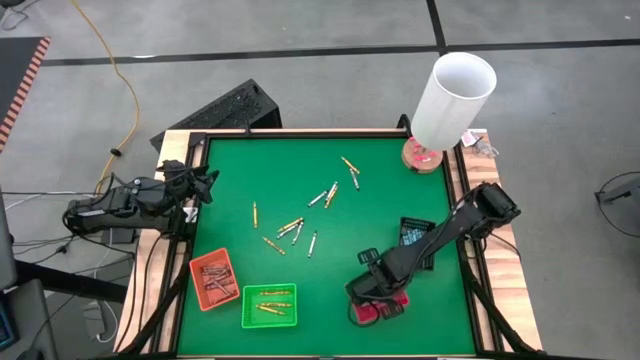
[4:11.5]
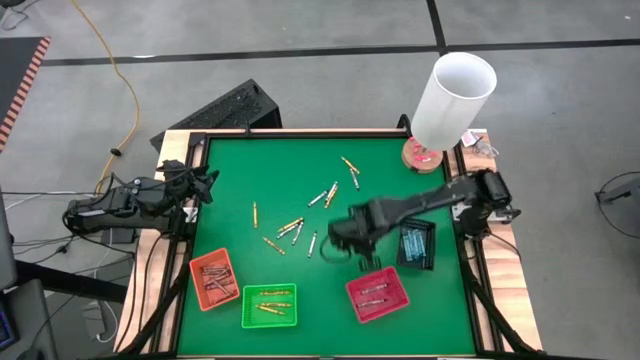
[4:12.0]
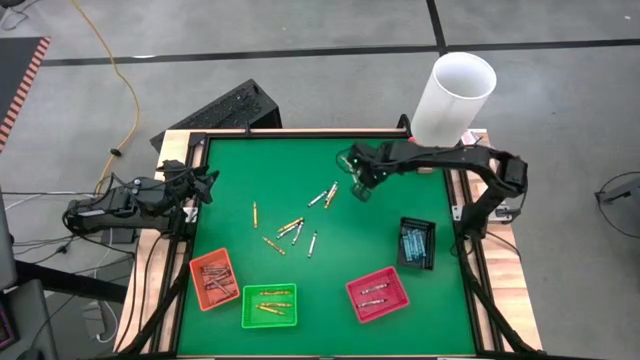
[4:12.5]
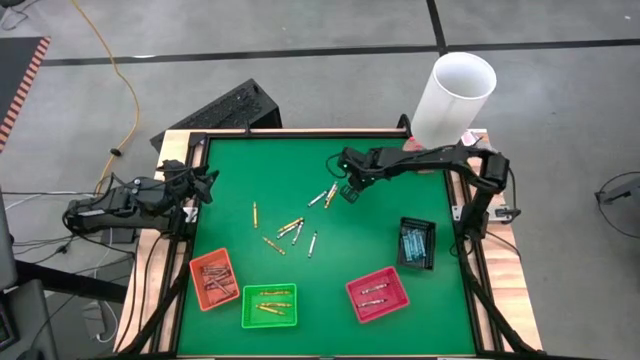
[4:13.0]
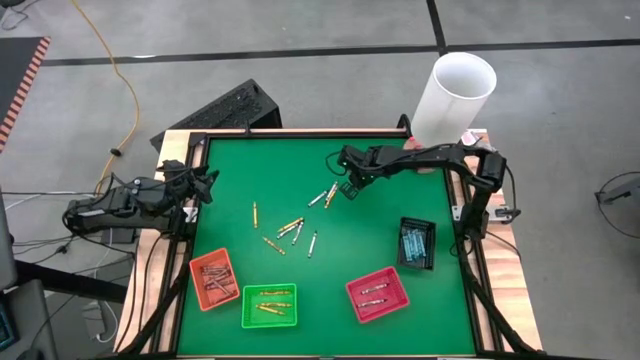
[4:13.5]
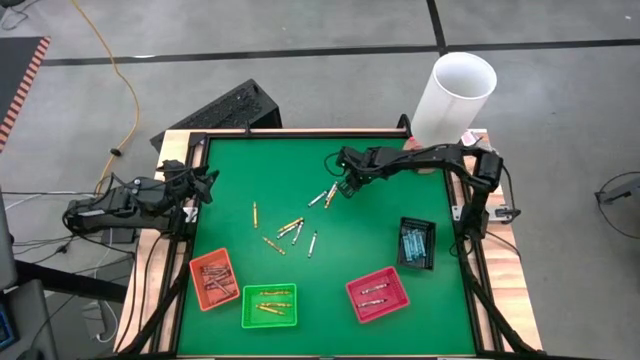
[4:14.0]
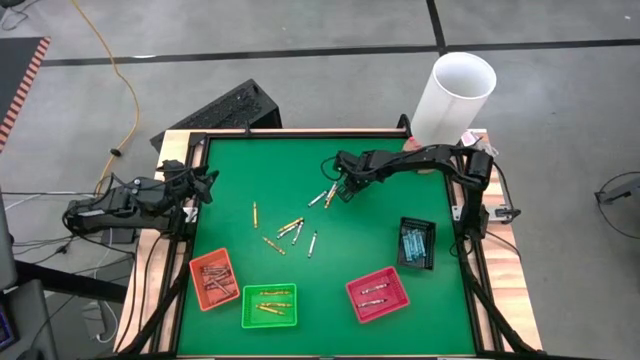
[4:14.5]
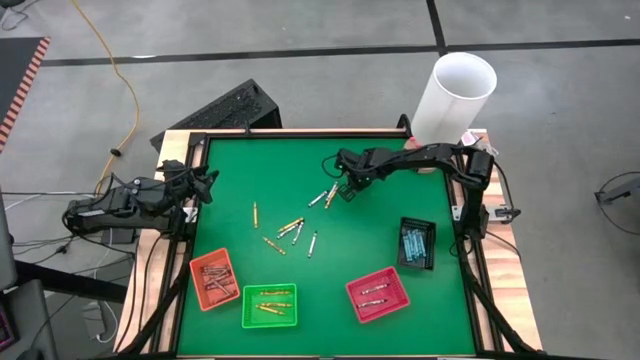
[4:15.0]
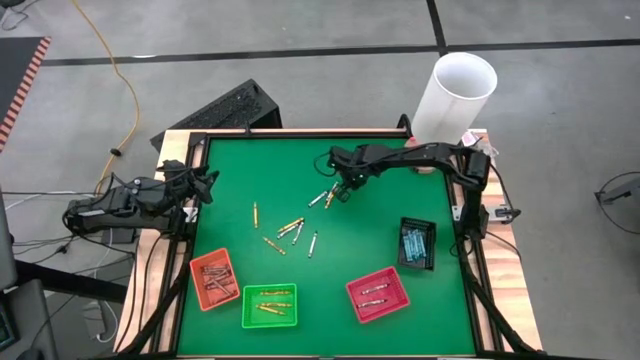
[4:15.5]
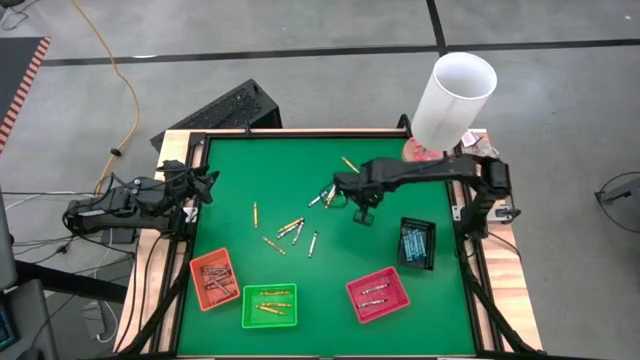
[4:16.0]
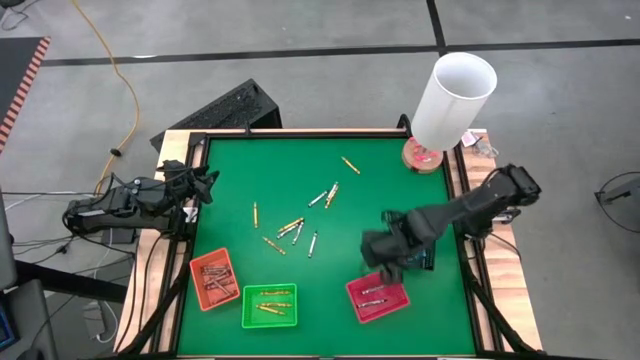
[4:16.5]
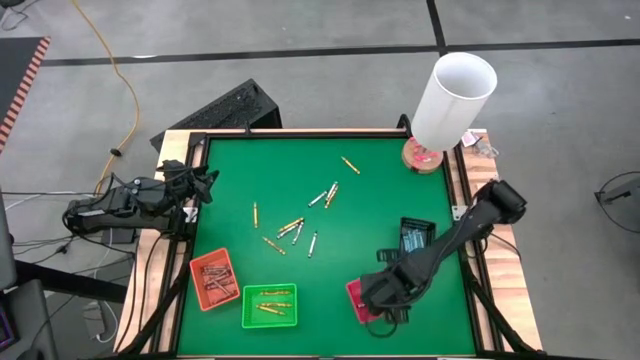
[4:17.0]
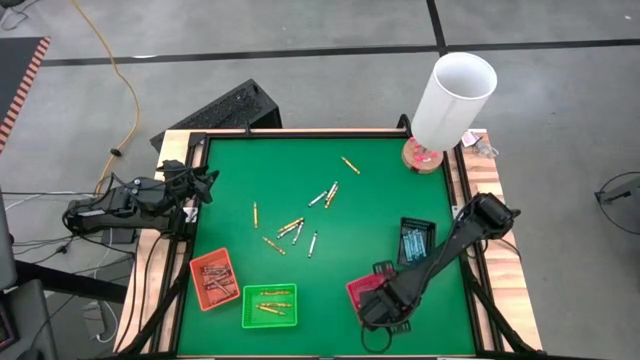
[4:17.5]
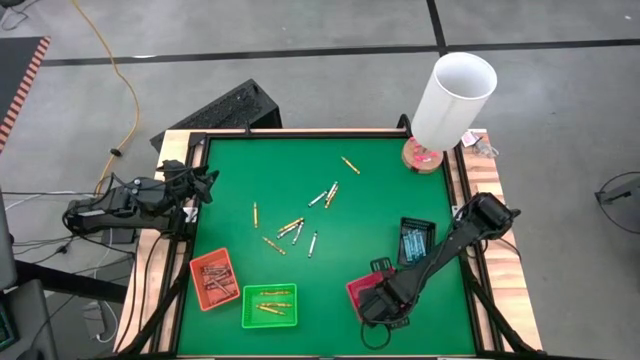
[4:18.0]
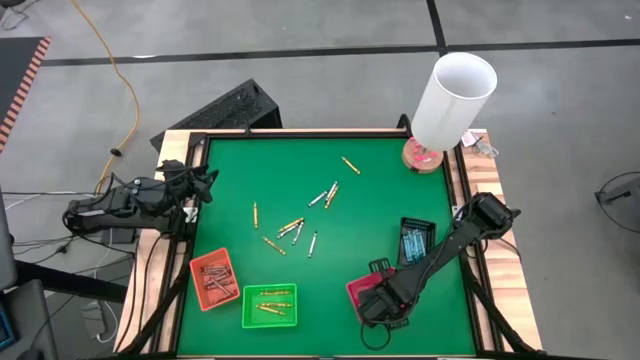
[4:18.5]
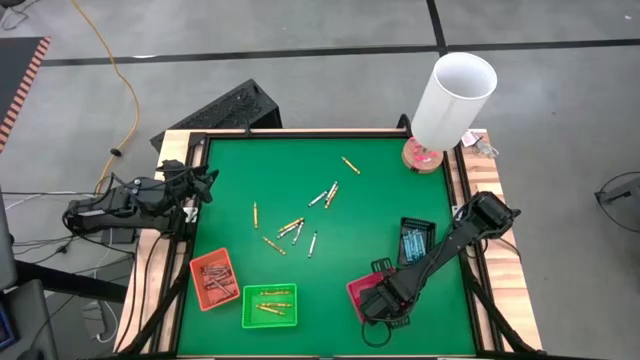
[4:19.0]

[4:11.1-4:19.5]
Task: Sort crayons
Put the black crayon into the red bin

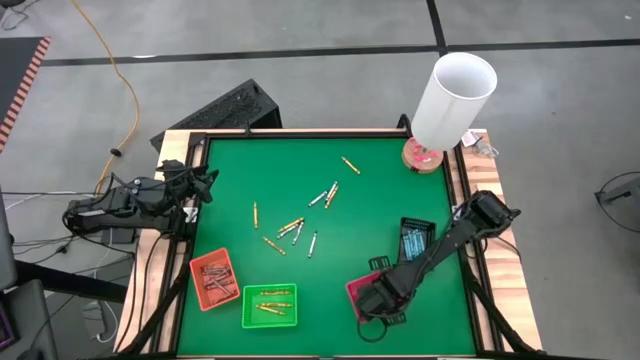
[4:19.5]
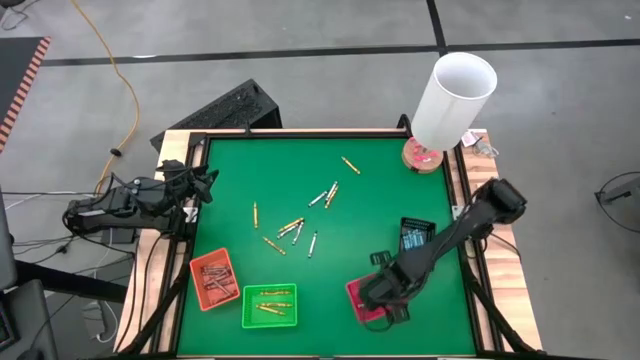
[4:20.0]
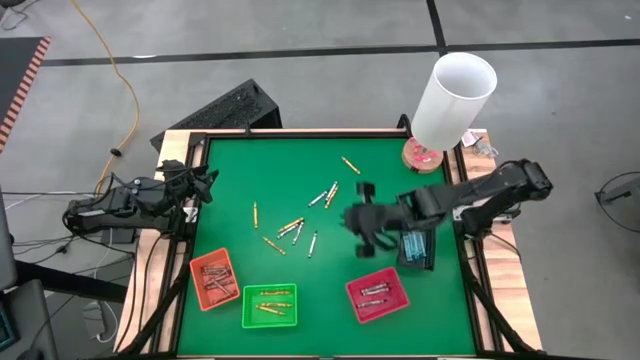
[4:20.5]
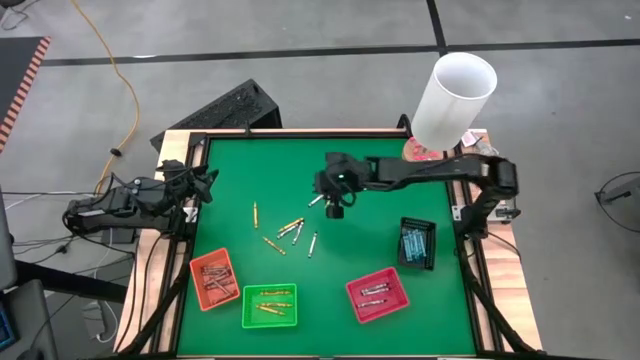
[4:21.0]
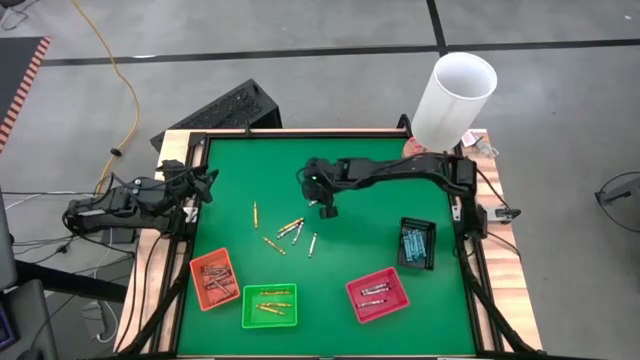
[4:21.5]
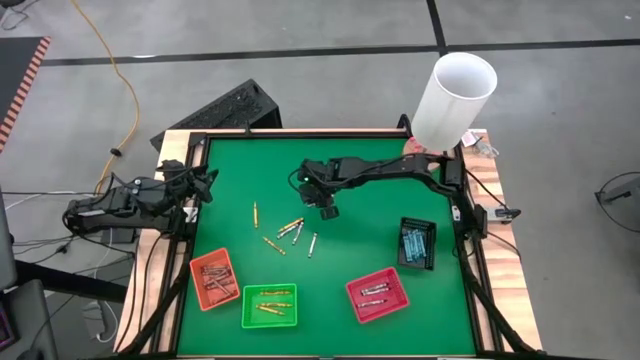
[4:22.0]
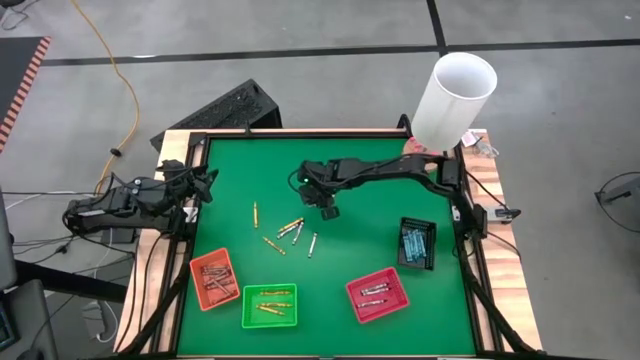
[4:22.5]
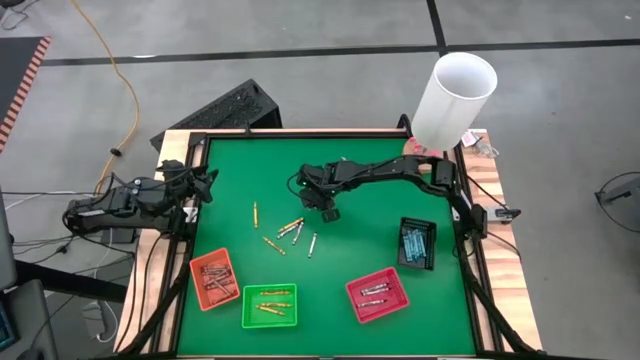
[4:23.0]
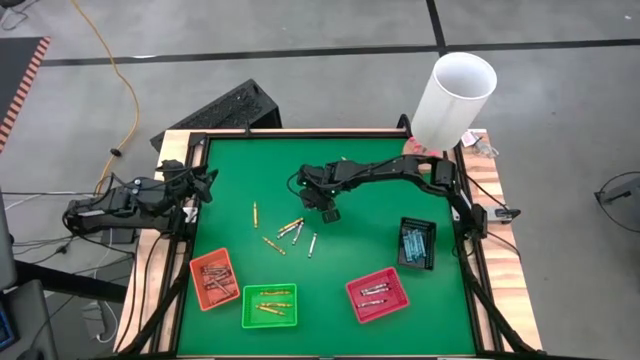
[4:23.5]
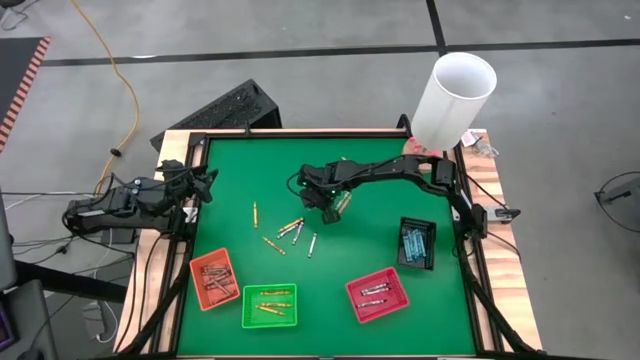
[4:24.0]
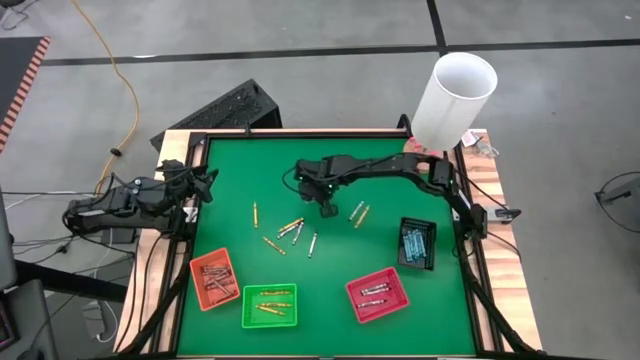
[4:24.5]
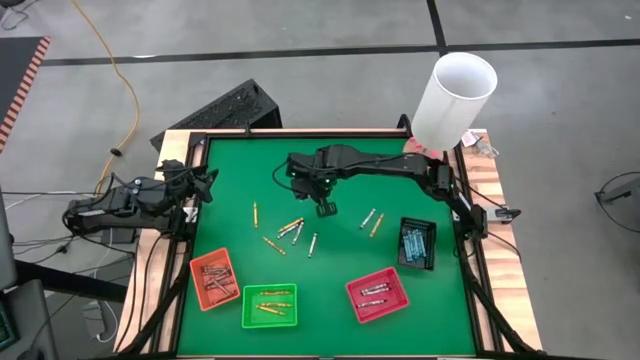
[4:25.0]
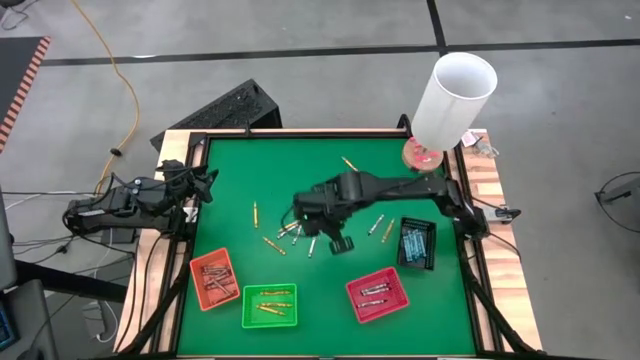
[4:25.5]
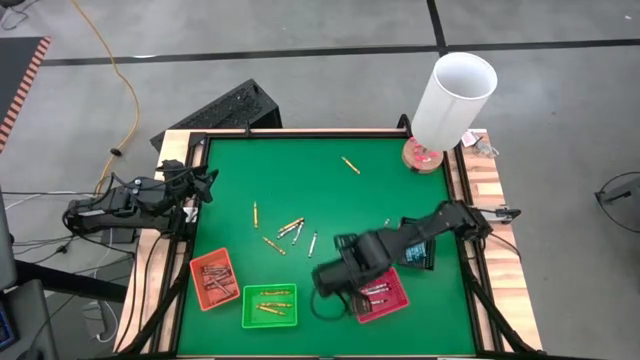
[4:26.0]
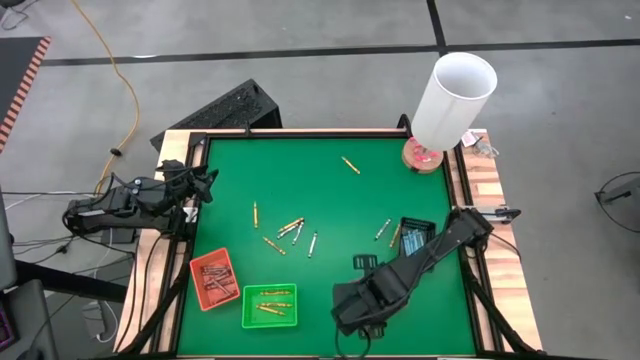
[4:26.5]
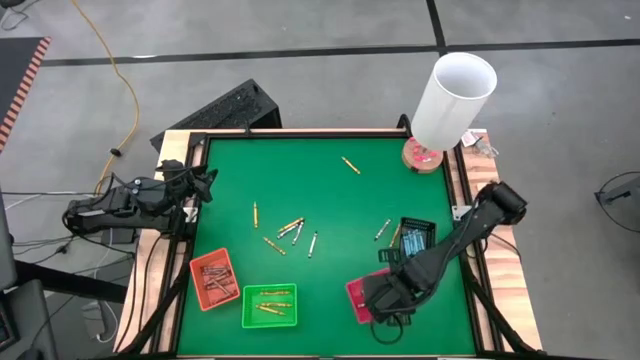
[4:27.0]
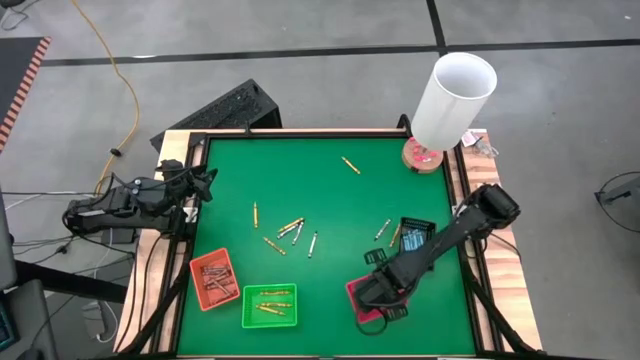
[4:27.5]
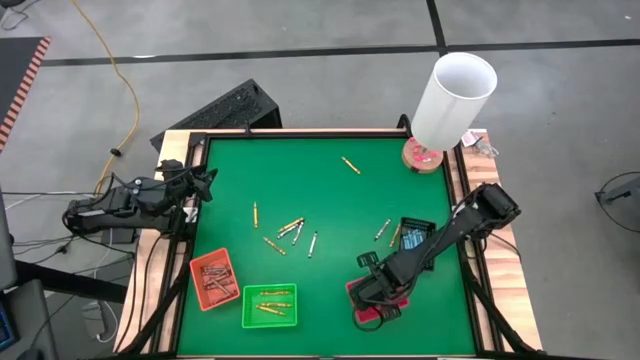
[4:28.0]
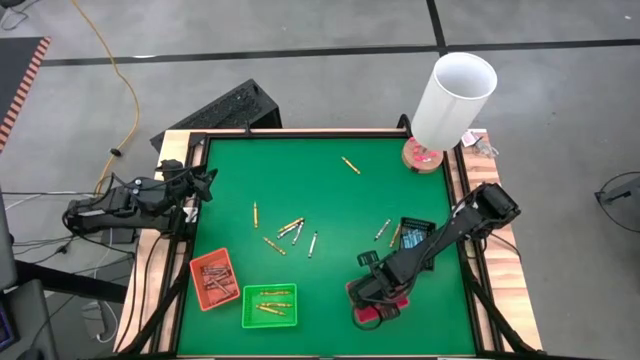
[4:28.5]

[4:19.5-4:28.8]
Put the black crayon into the red bin

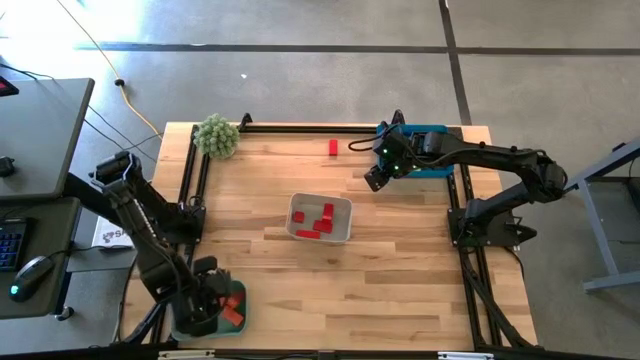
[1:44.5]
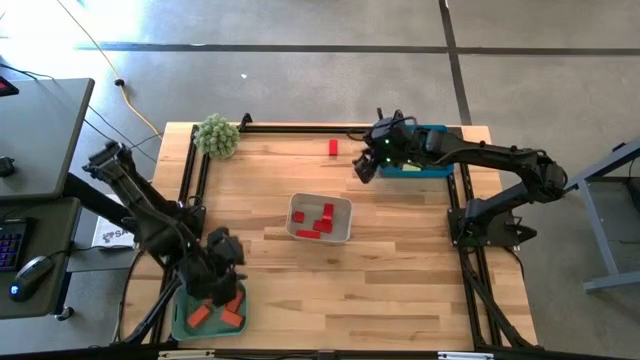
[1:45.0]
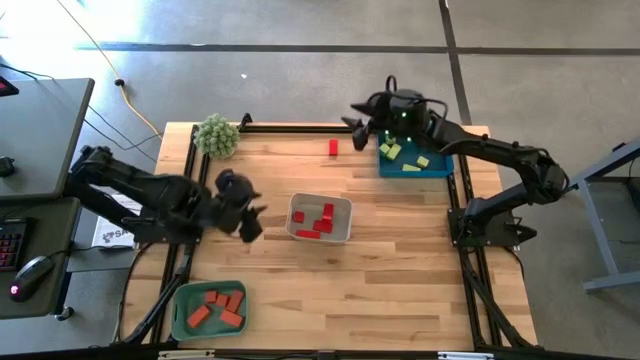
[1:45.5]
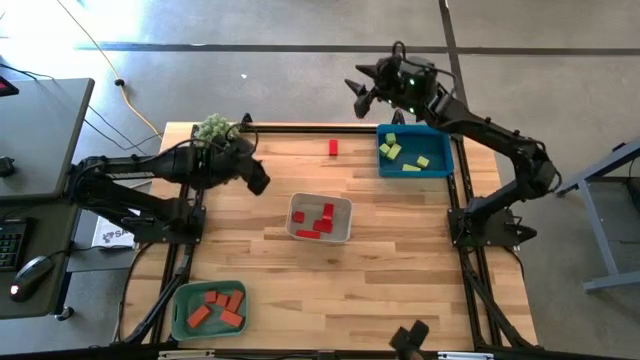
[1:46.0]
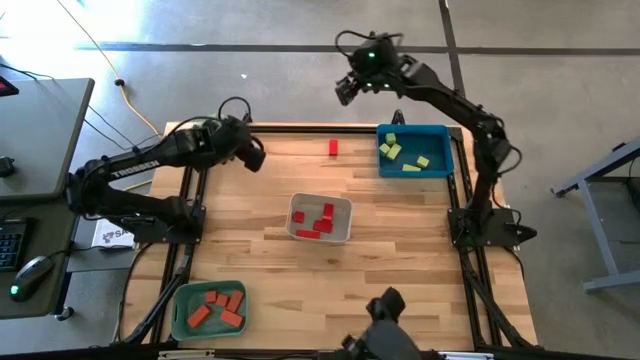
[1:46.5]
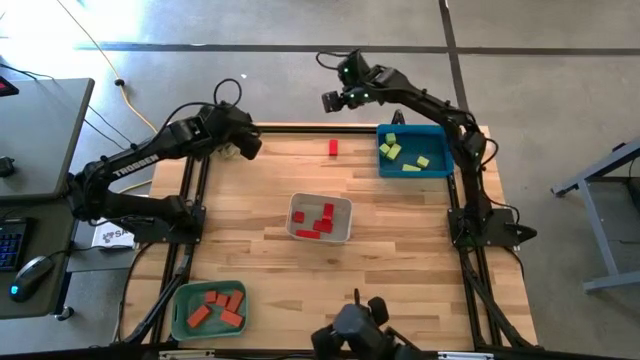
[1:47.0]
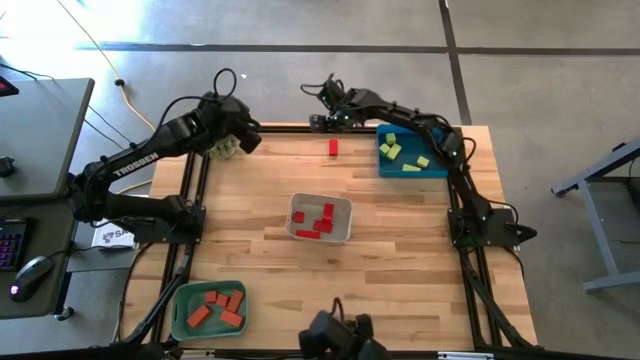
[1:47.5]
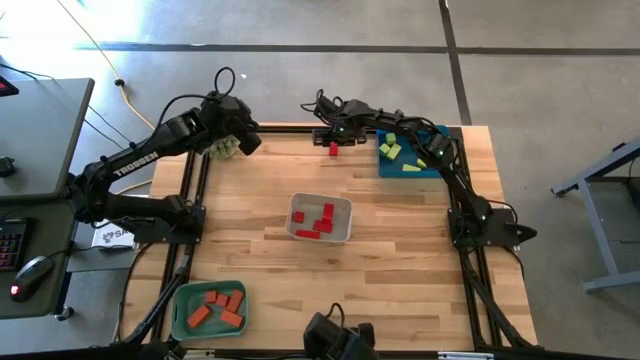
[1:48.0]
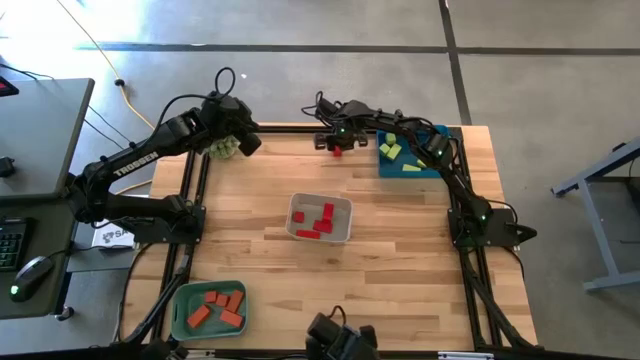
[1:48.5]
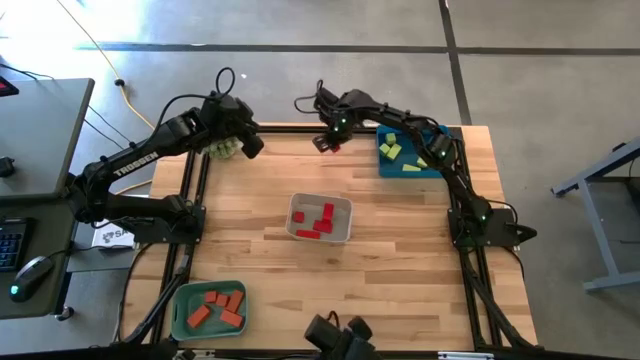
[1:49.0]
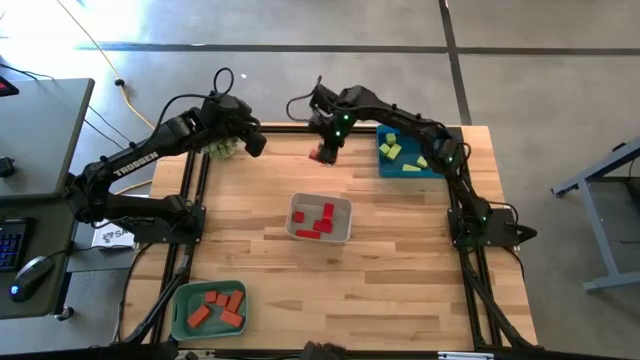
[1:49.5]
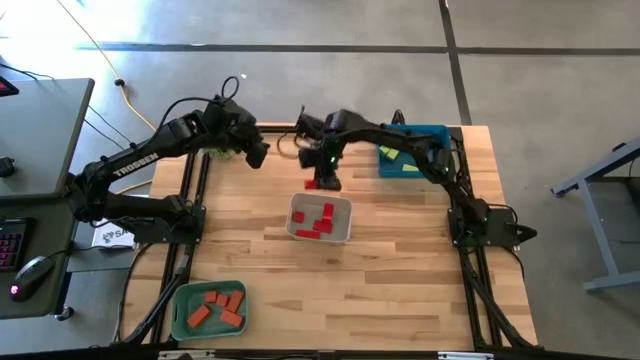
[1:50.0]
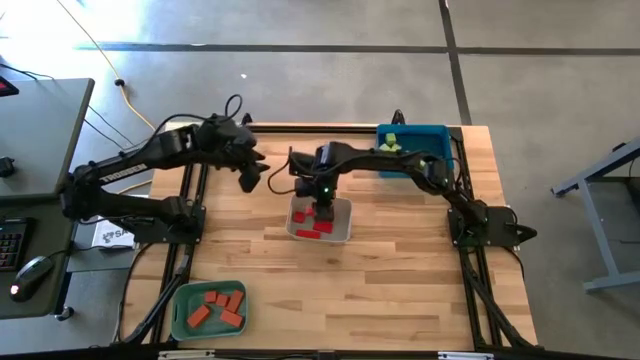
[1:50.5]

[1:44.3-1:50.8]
Task: Sort & place blocks by color
Put the red wooden block into the white bin
